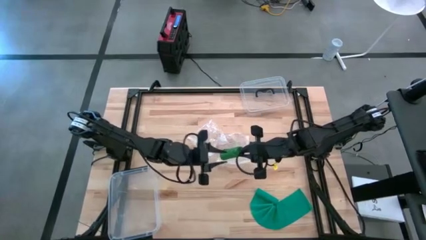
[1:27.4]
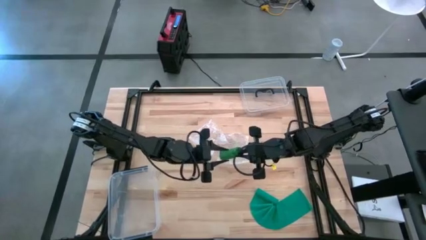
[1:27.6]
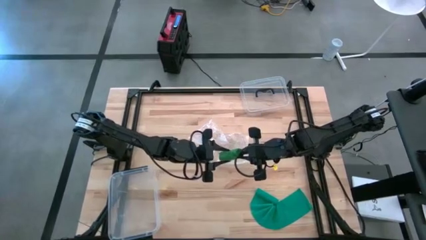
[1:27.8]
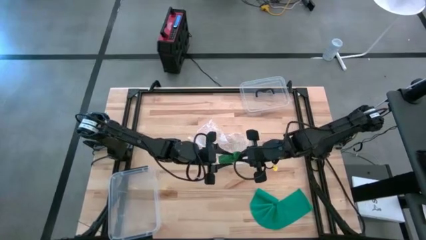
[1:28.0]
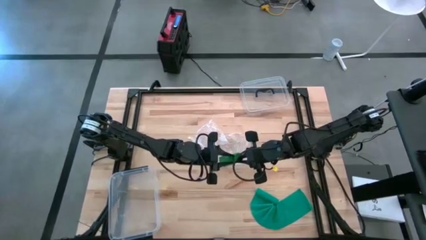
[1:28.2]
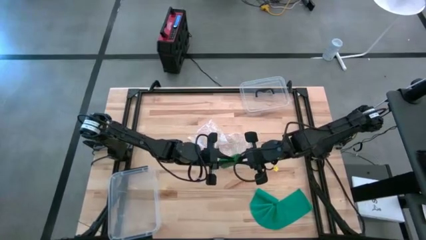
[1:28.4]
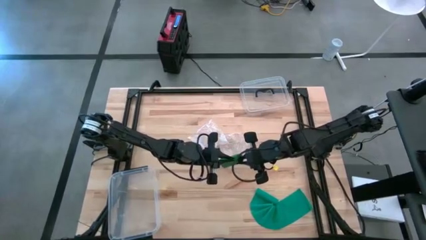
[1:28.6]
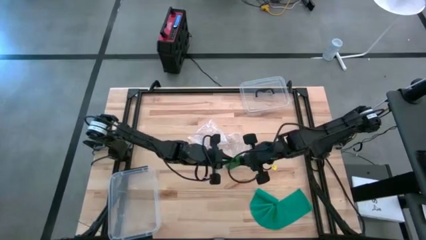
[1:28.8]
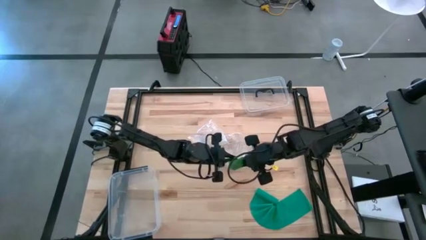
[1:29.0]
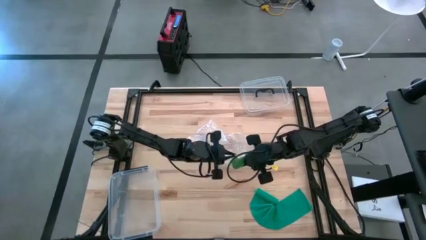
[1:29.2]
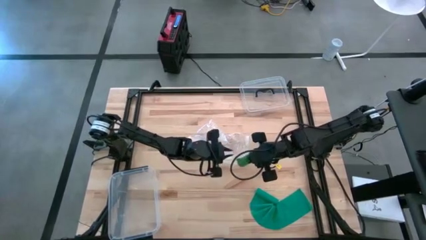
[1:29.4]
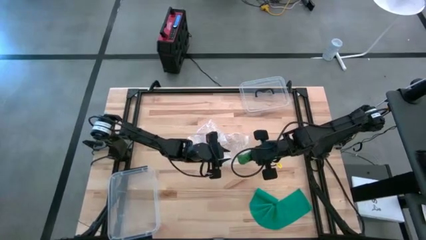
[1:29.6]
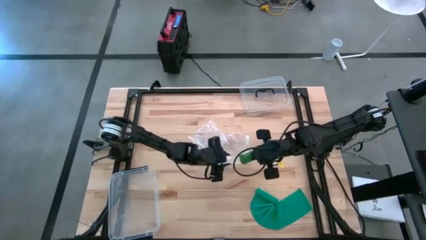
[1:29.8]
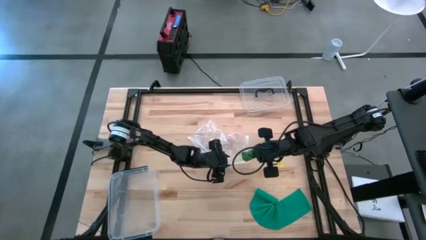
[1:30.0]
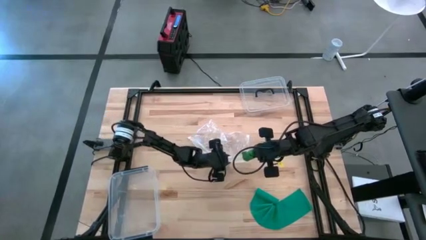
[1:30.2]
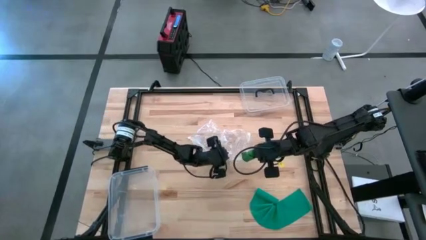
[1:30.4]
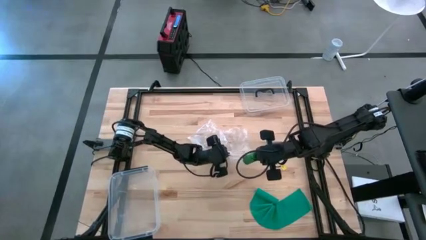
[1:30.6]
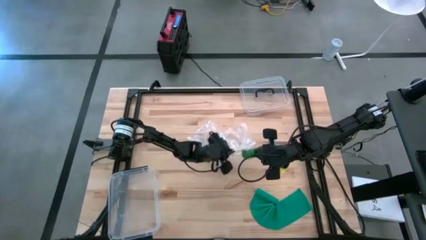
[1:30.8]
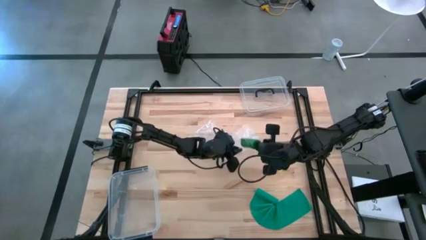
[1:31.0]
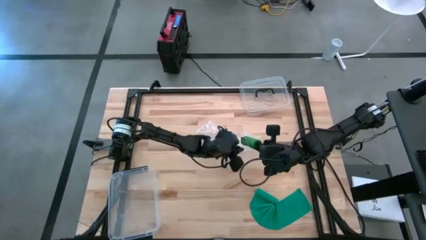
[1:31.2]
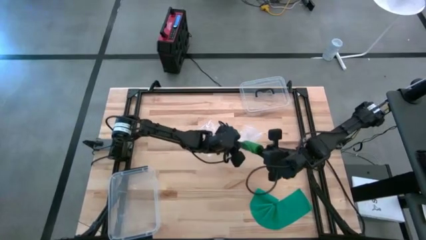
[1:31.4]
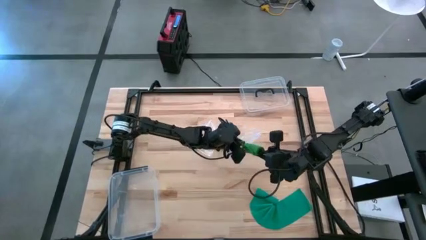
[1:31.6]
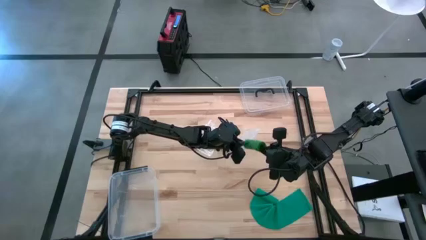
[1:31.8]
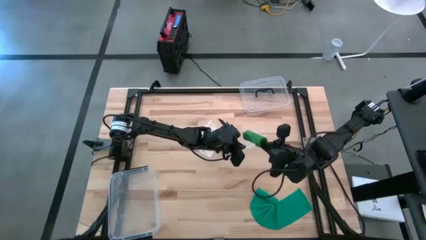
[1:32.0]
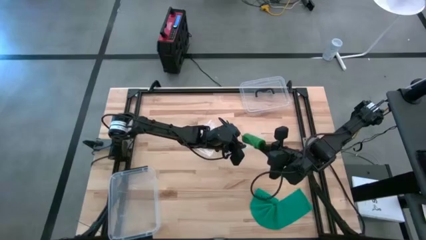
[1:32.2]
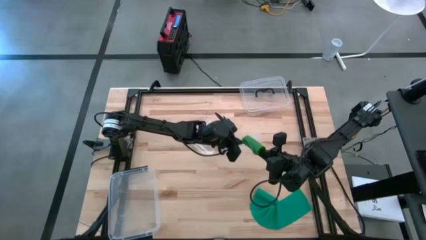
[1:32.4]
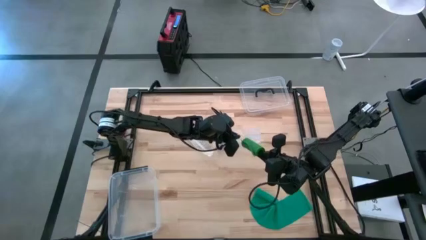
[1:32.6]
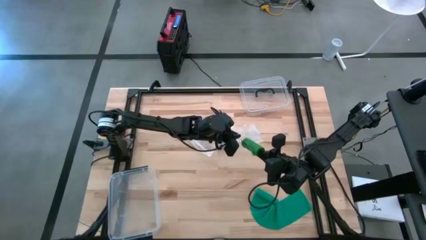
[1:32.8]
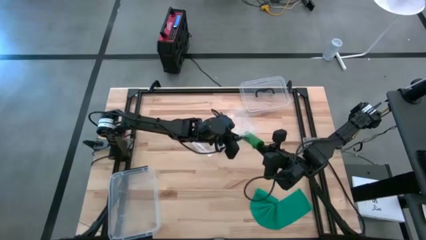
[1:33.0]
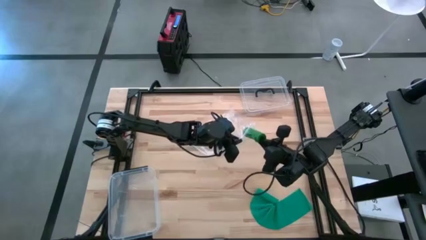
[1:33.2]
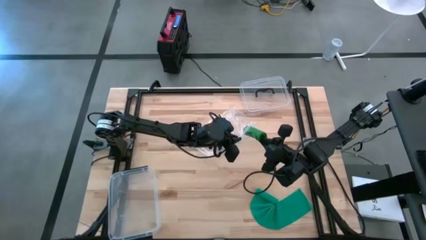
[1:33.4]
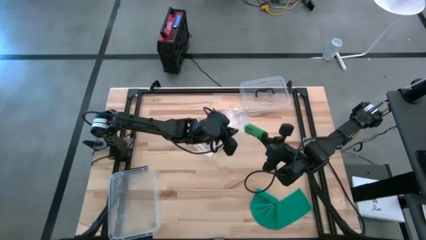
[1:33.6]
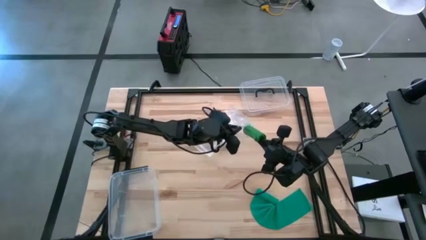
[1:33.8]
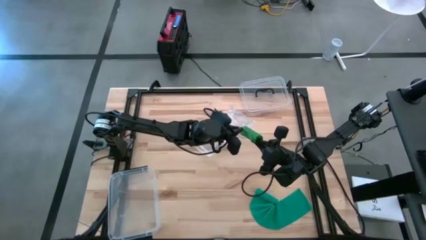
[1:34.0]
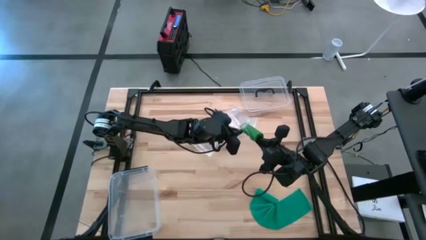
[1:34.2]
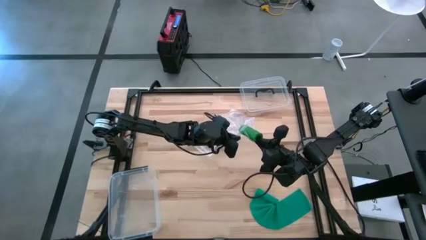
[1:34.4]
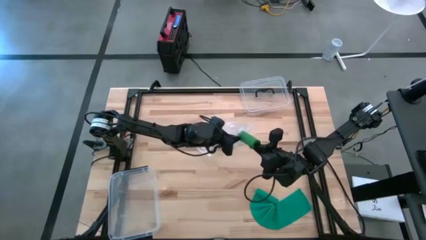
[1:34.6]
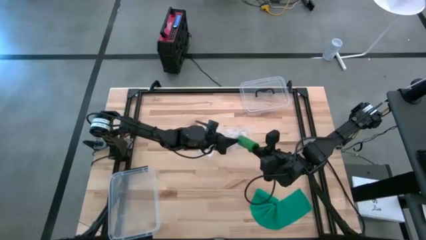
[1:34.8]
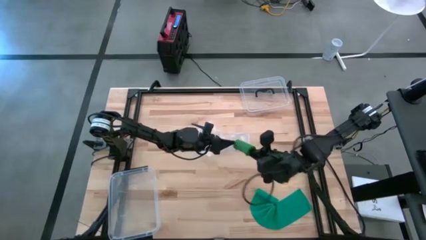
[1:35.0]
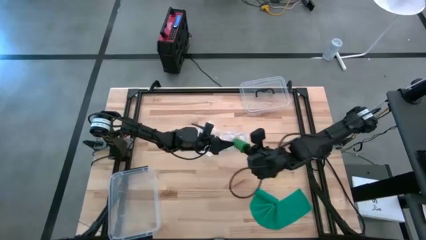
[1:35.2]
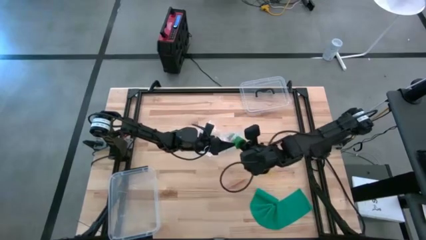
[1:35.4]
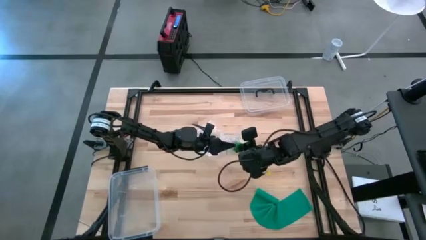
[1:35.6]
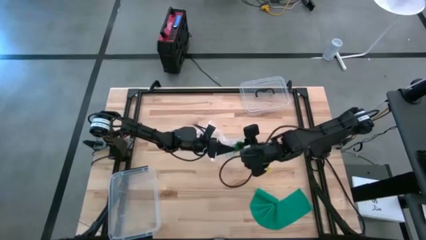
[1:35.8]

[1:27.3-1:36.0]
Task: Roll bandage
Put the green bandage into the transparent zip bag

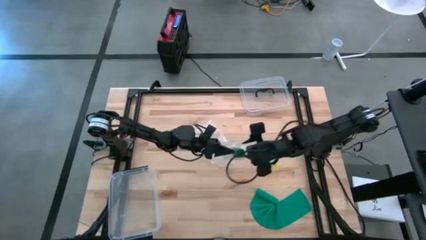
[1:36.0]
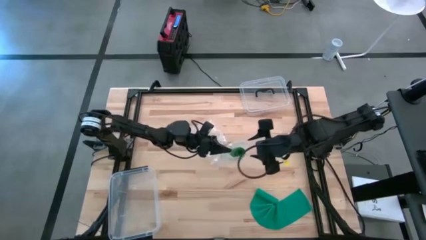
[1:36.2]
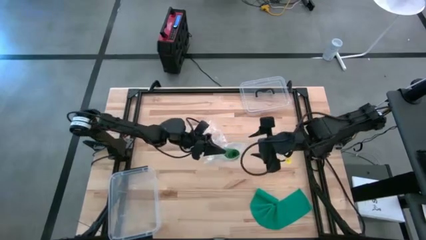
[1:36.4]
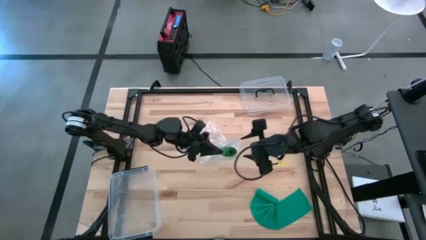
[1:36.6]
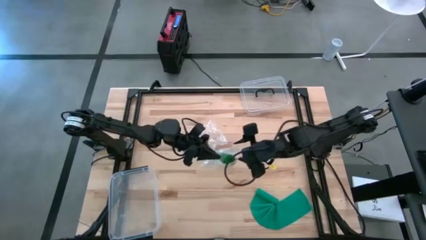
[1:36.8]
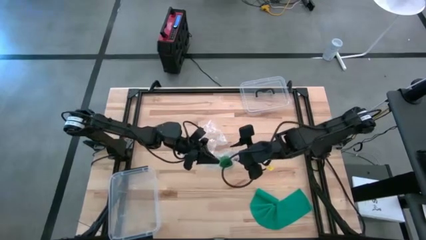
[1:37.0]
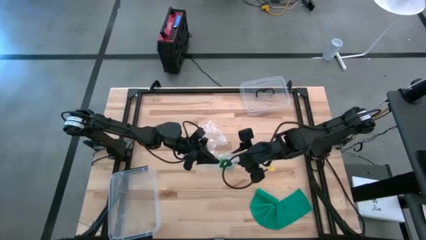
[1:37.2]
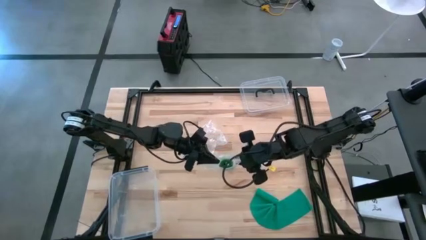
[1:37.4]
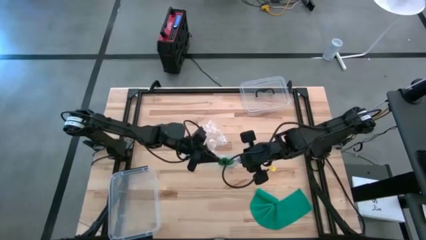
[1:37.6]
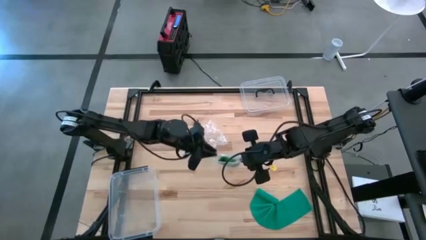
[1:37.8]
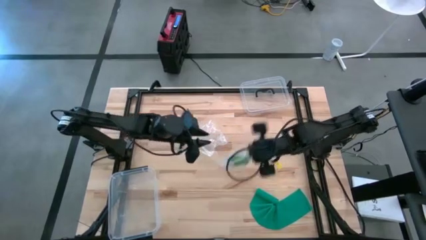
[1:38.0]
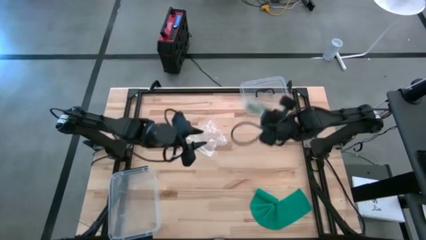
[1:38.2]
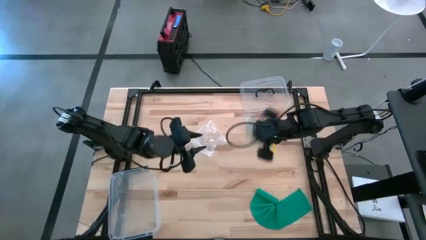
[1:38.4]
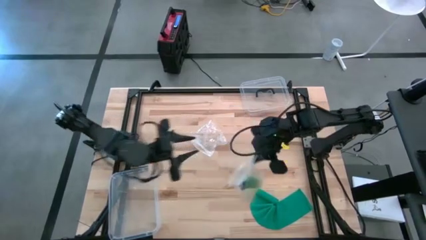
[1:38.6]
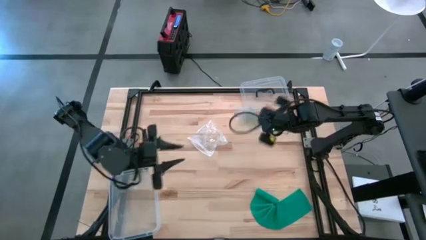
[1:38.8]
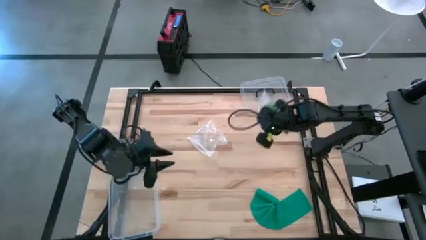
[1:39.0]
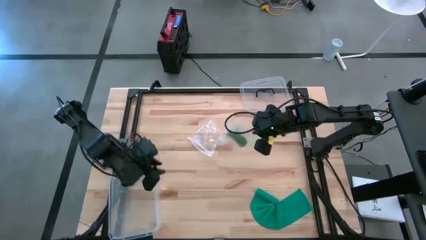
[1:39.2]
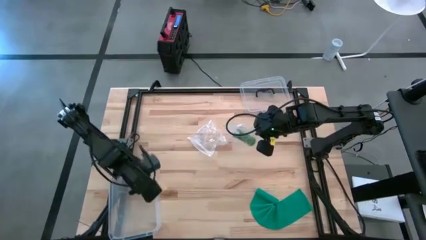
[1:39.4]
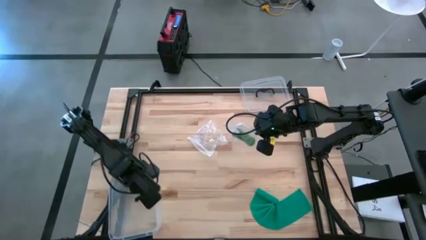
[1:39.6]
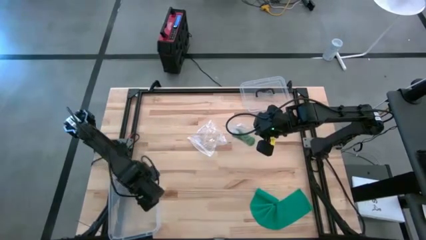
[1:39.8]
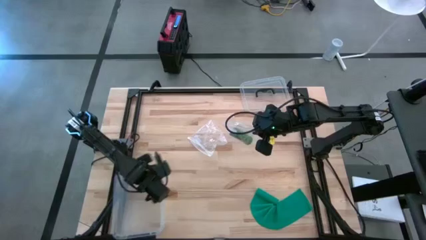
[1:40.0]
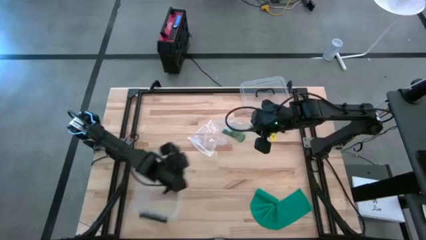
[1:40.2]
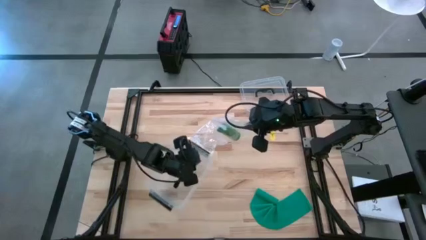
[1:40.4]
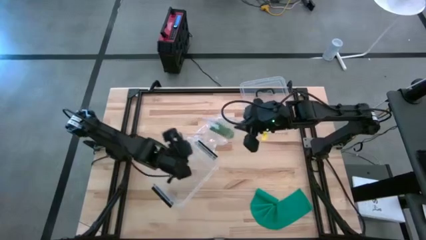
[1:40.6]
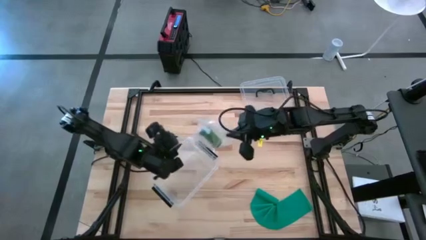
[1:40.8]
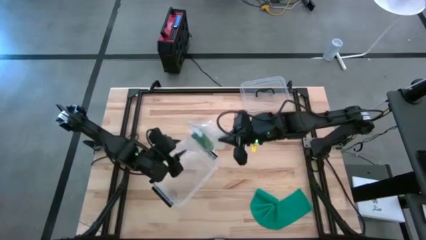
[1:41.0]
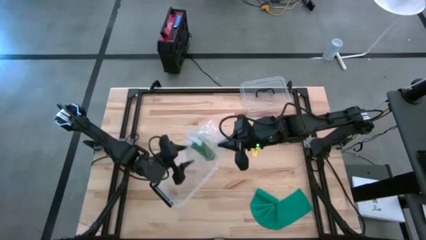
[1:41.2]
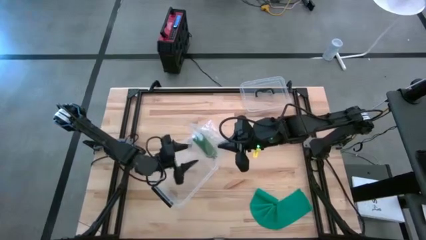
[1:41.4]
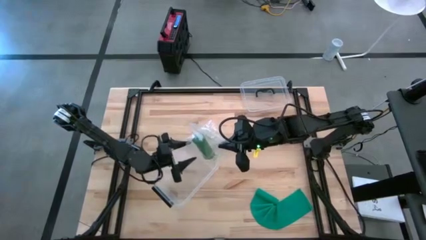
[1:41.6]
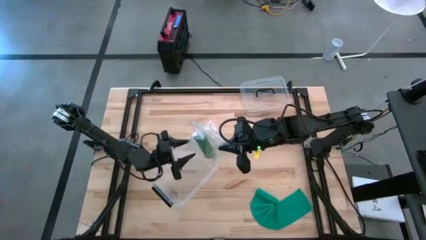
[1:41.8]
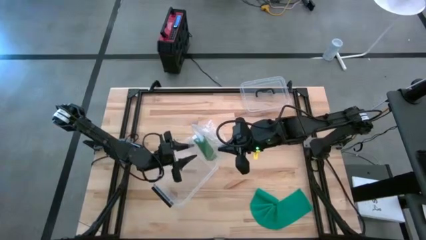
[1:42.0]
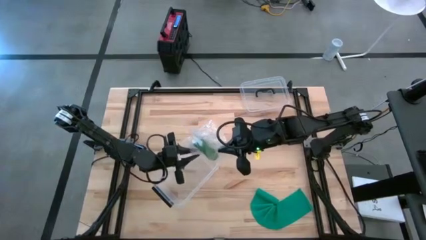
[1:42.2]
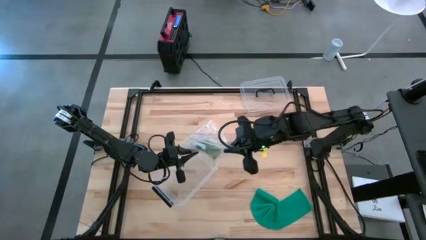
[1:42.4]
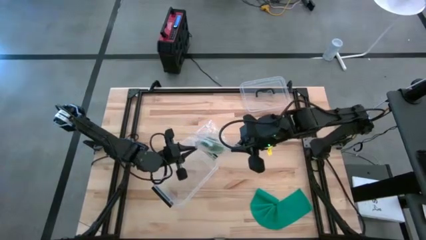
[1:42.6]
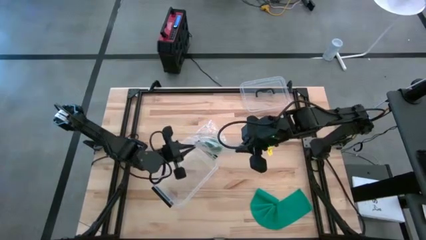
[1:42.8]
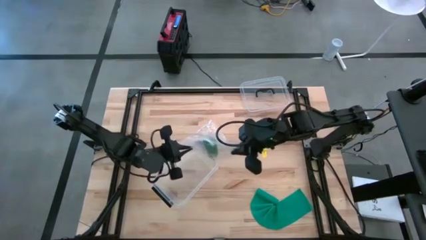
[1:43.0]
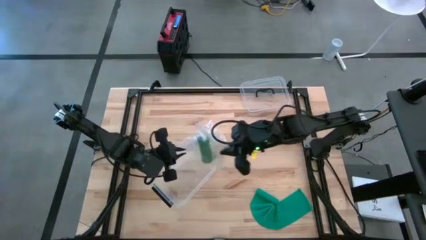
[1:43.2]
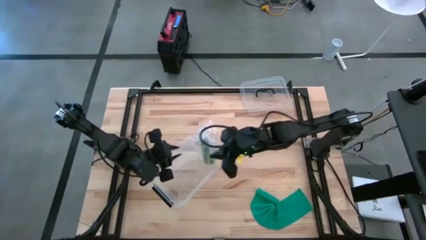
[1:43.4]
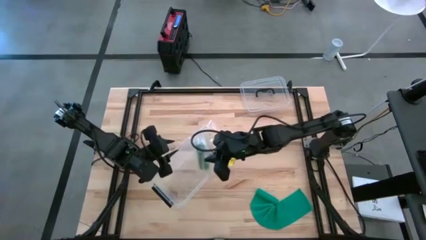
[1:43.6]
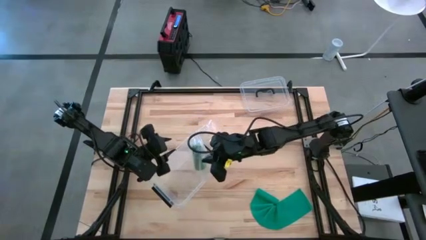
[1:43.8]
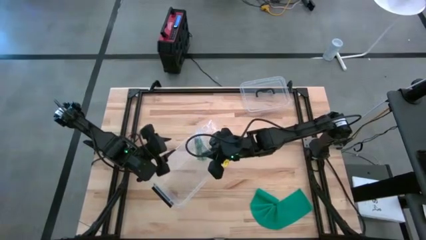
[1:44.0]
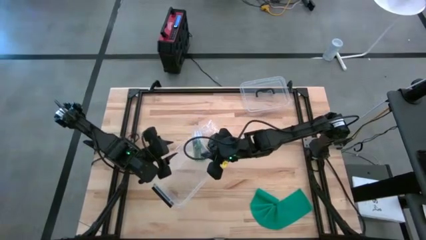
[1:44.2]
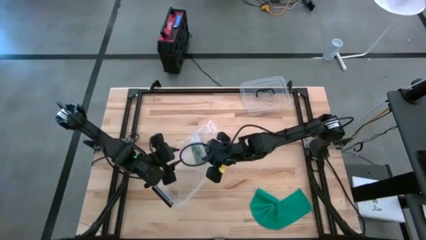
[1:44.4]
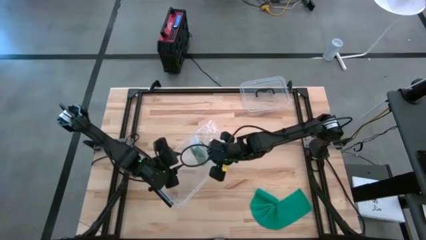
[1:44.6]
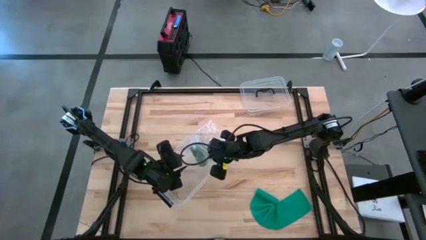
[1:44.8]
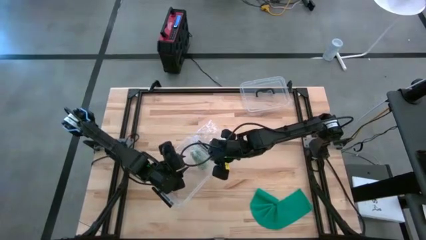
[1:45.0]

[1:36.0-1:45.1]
Put the transparent zip bag into the transparent bin
